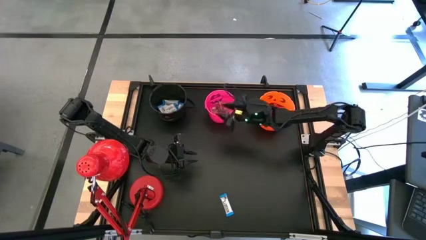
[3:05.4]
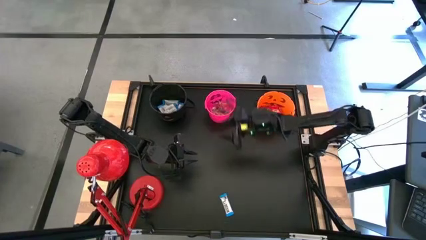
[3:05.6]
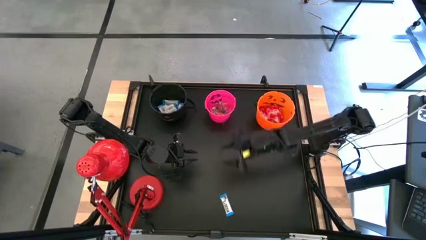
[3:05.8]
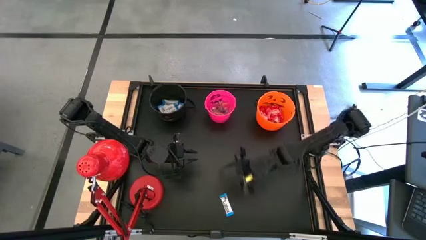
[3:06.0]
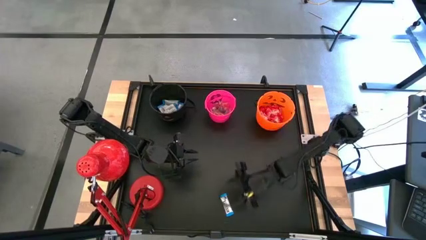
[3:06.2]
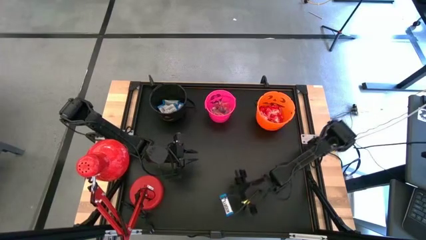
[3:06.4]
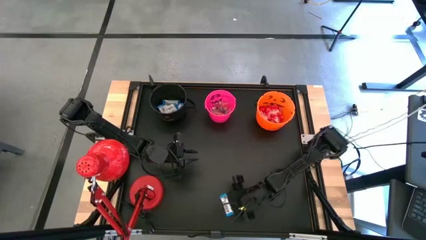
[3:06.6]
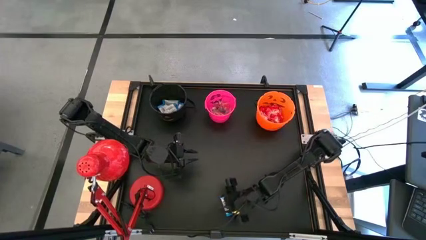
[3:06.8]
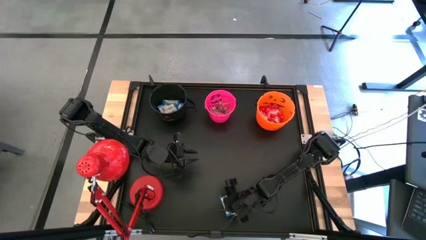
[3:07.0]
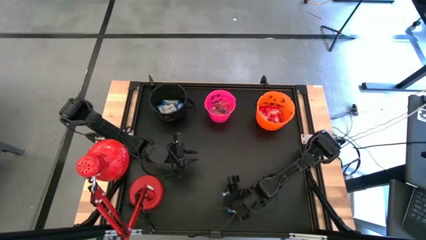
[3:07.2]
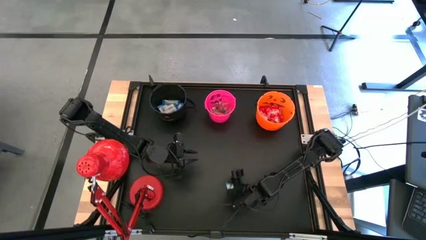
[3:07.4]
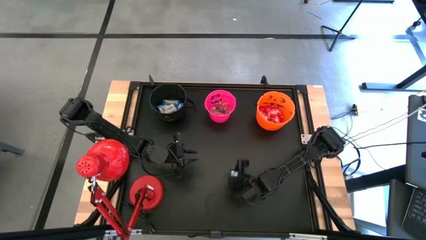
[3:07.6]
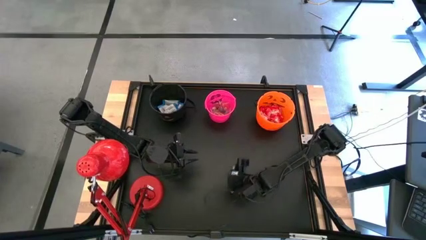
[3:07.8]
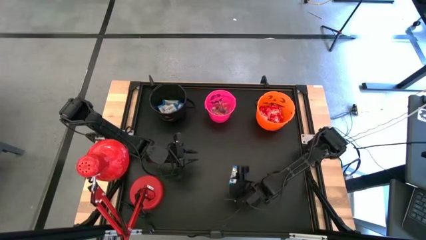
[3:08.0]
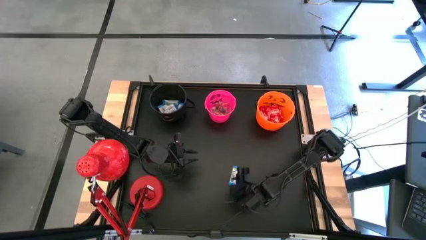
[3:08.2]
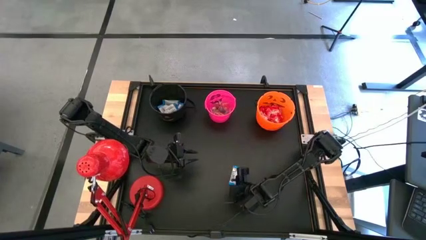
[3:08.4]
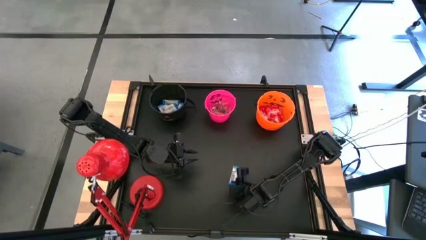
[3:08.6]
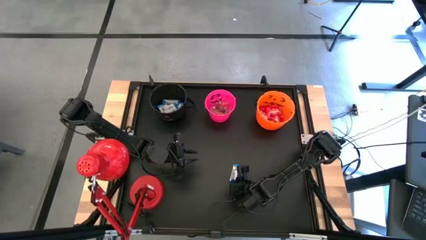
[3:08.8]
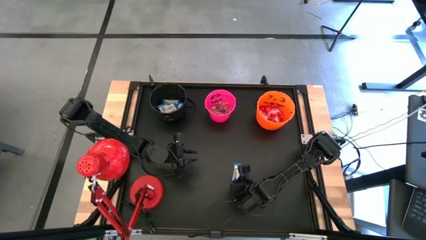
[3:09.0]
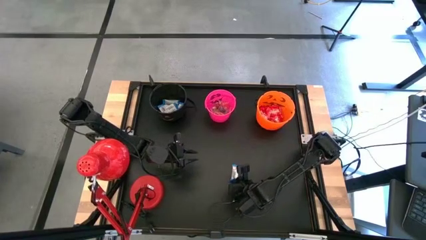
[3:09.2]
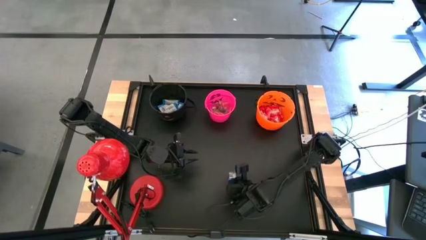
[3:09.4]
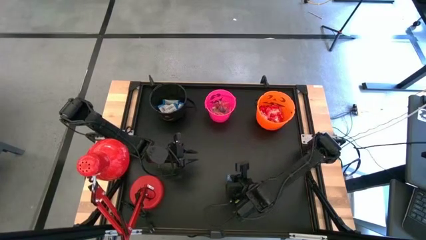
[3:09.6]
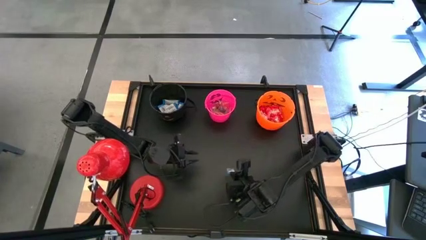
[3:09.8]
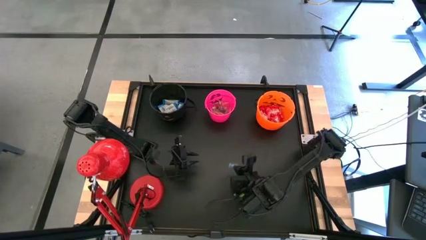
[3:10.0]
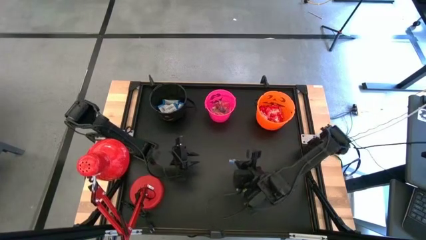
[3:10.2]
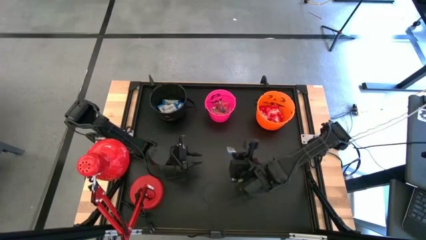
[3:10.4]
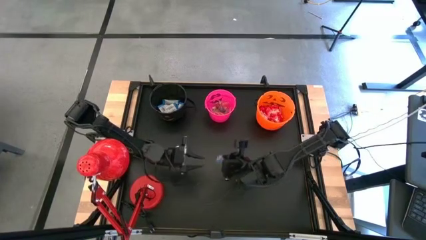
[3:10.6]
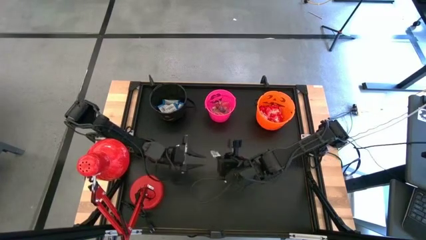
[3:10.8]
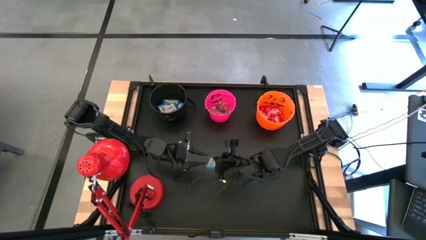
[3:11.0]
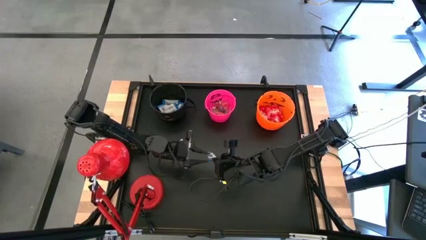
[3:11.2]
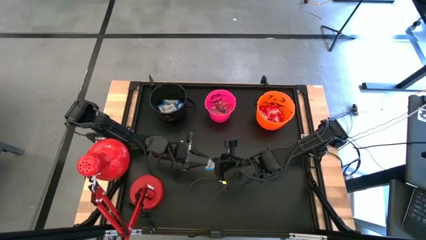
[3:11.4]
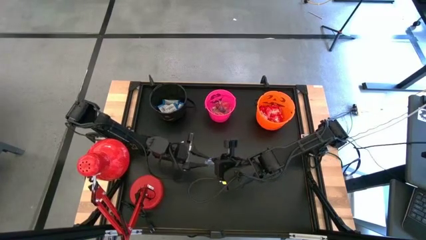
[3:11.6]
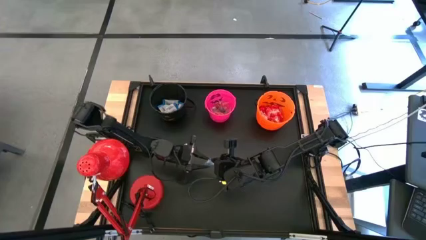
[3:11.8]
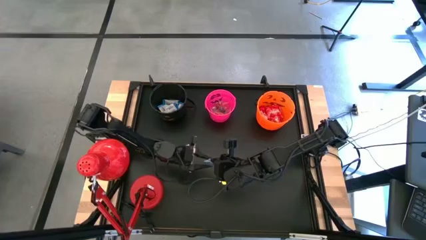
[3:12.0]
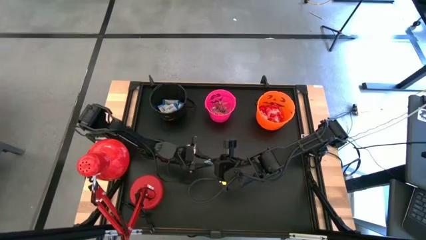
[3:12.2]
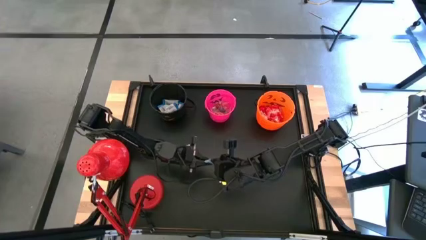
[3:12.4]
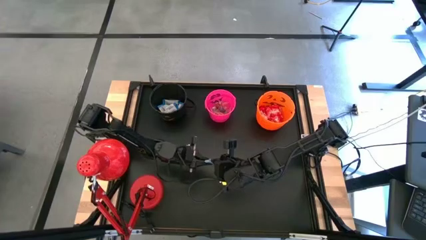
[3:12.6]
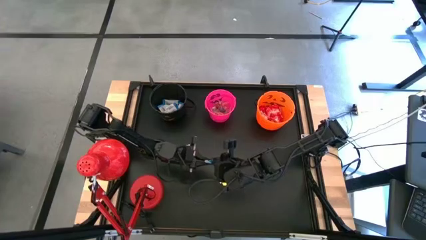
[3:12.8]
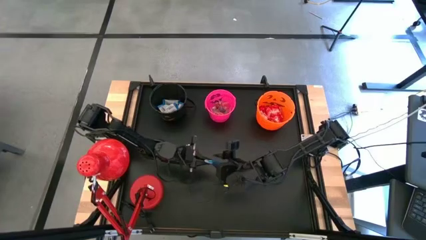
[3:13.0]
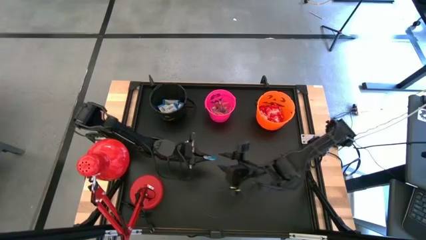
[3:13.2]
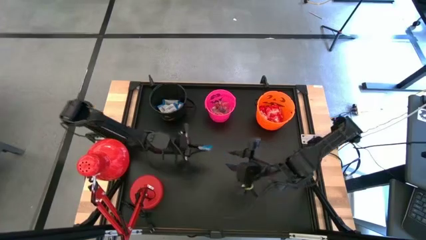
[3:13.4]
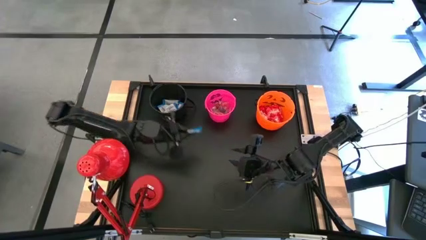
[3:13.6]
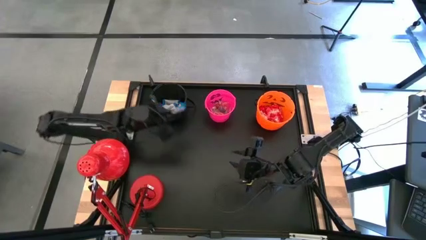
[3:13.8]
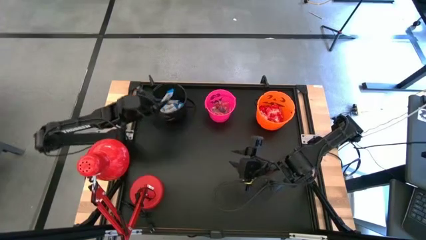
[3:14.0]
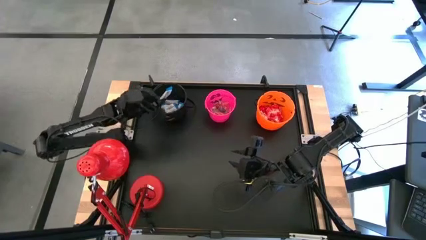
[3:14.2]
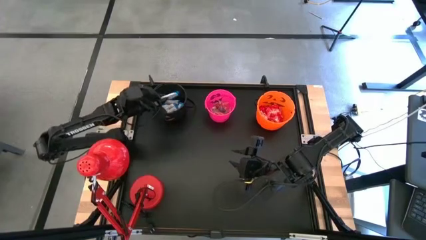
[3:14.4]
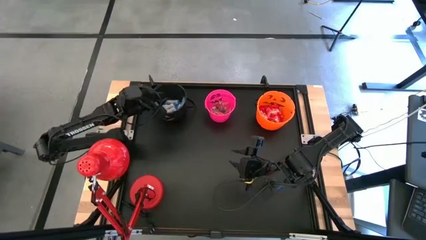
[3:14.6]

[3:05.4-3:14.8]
Task: Organize candy in baskets
Put the white chocolate bar into the black bucket

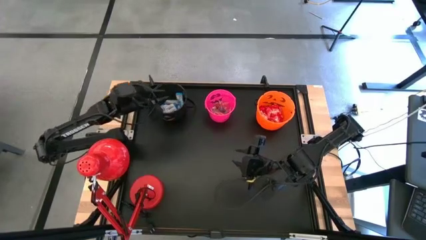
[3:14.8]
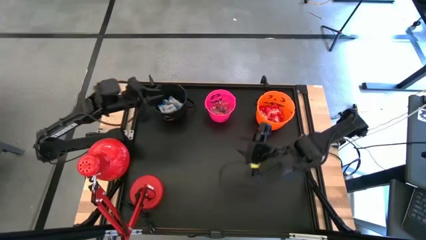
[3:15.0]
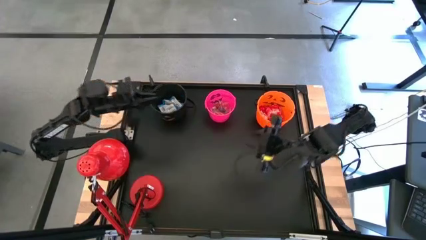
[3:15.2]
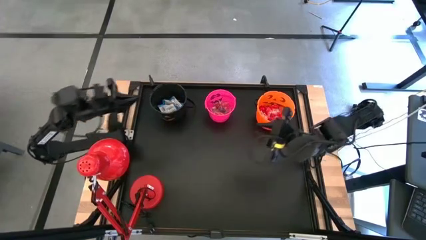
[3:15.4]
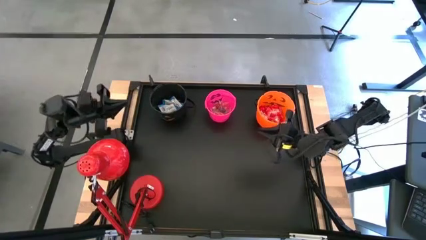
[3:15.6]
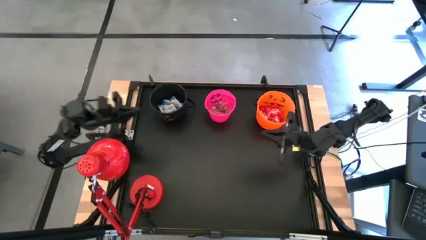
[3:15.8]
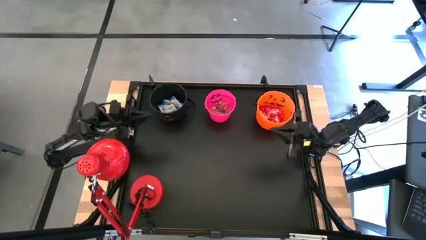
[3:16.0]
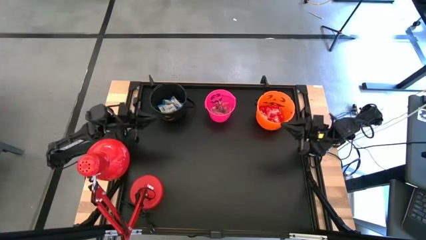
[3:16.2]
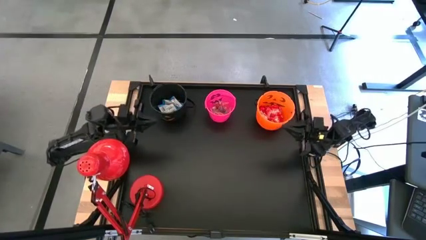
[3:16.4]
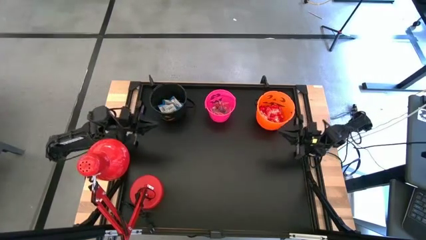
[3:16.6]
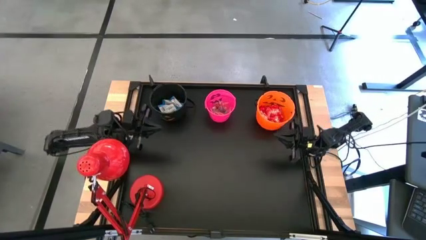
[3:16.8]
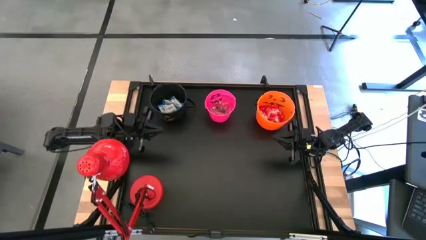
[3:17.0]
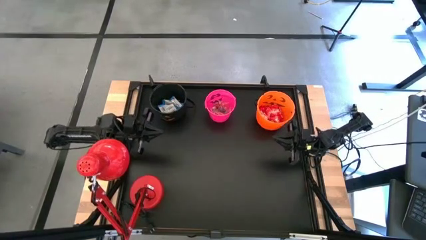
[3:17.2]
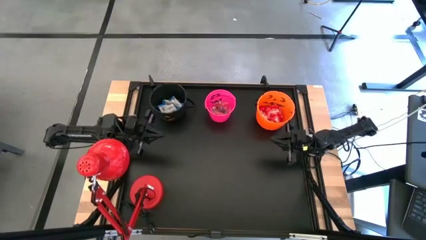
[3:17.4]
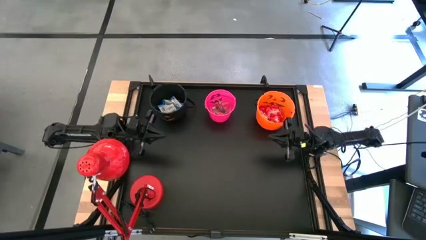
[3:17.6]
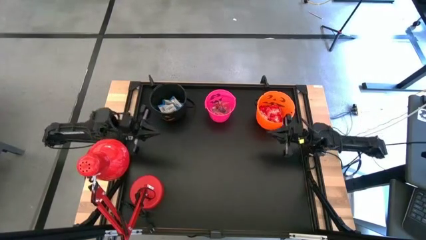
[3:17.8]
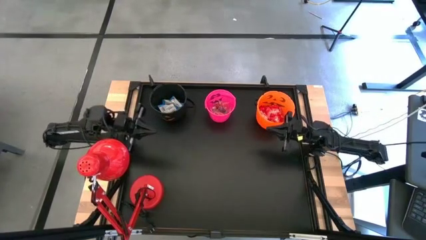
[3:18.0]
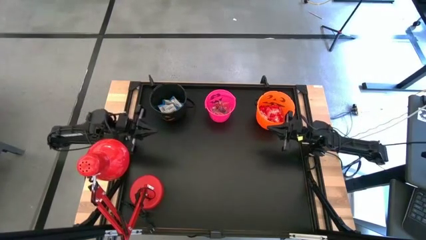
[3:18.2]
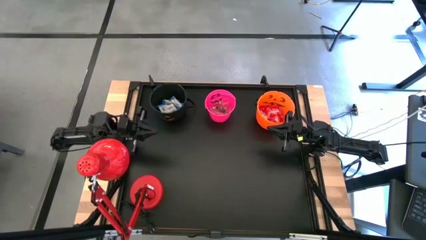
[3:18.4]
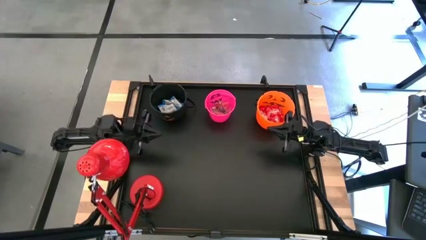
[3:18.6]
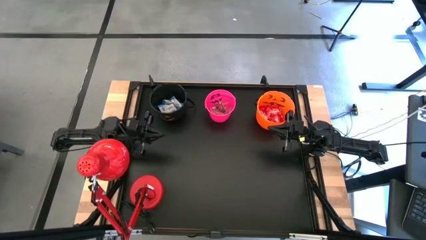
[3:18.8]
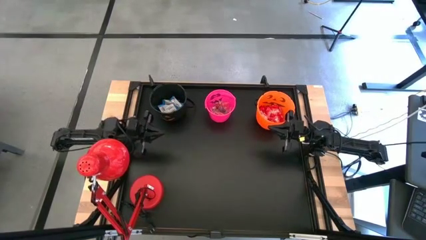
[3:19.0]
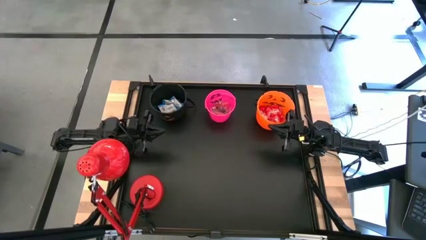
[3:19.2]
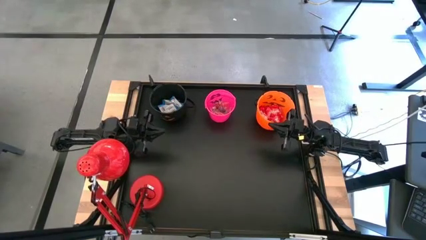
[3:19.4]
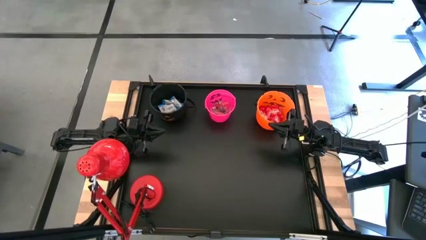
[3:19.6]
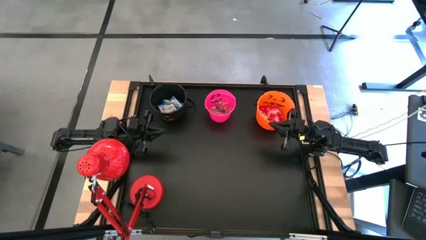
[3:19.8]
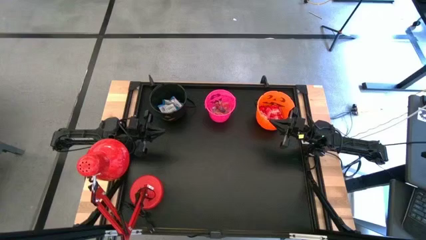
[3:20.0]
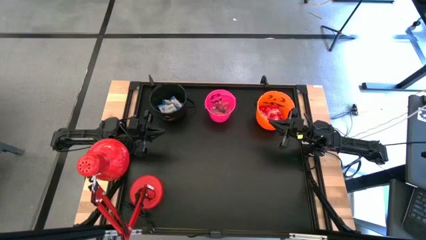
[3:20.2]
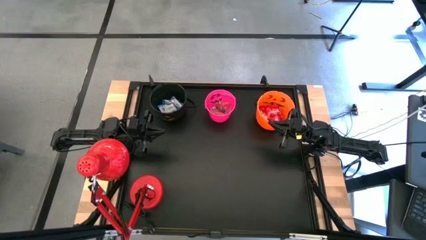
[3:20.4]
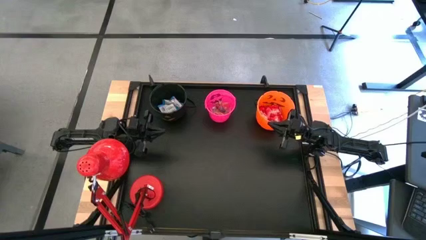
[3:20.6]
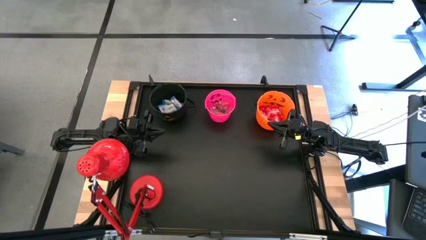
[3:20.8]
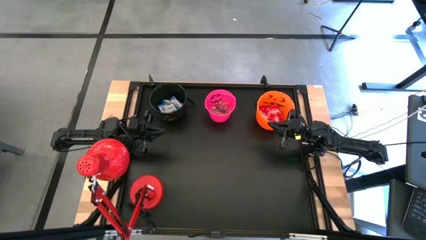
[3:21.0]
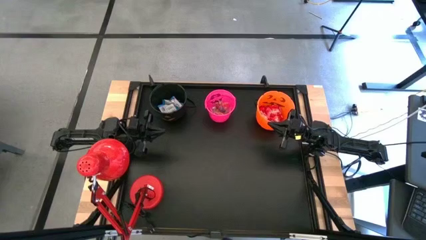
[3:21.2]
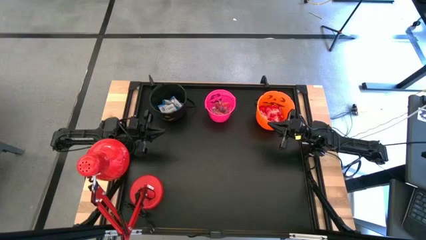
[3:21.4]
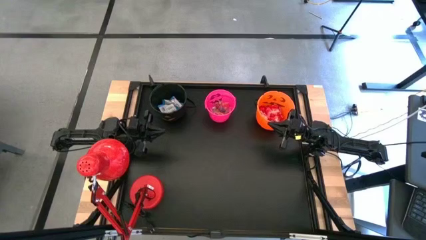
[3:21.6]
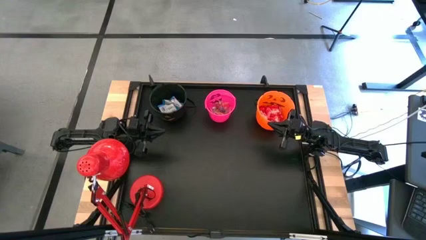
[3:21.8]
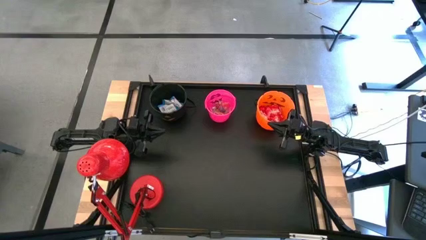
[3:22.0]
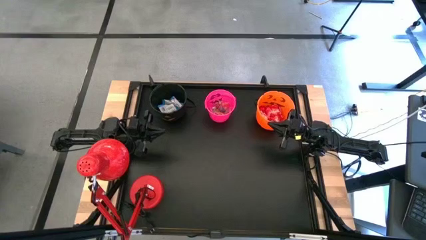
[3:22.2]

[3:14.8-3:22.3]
Return to Home Position
